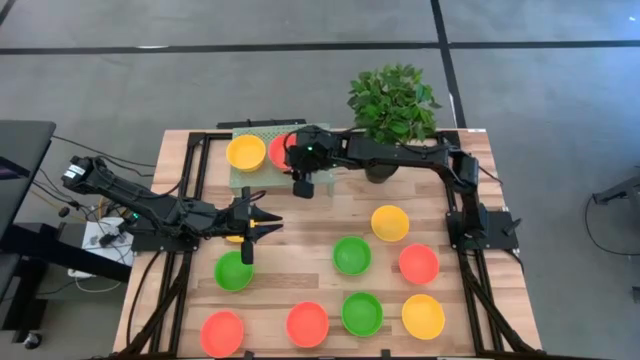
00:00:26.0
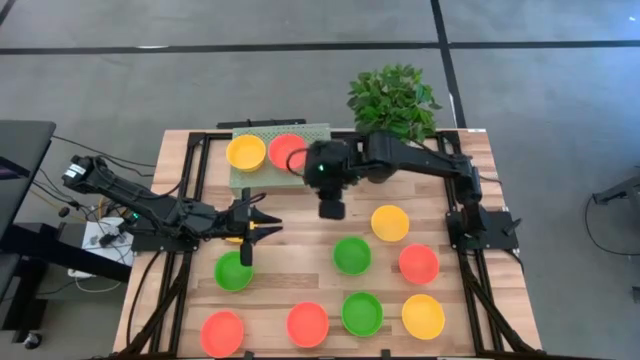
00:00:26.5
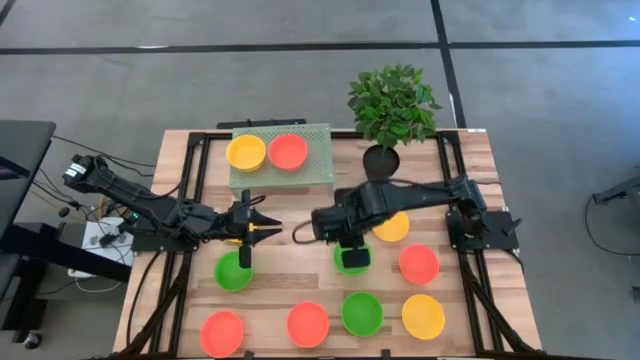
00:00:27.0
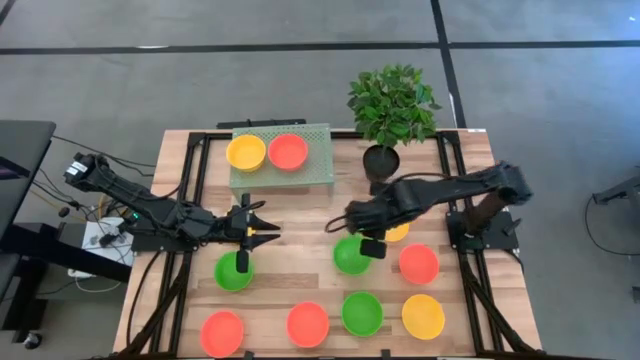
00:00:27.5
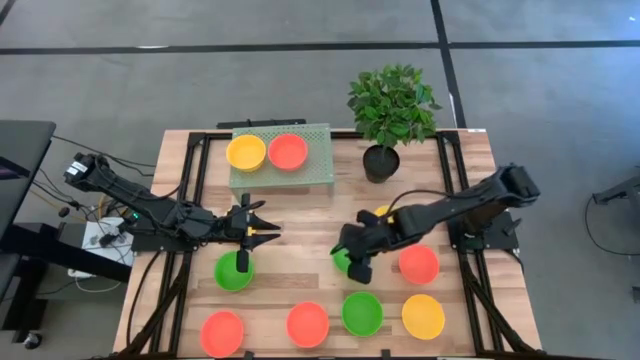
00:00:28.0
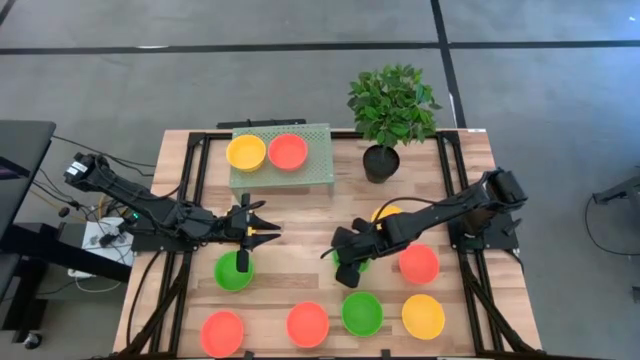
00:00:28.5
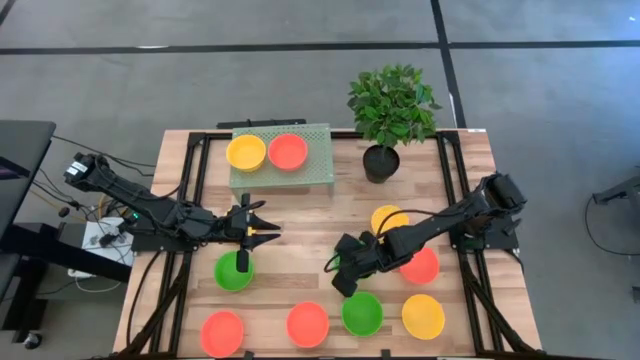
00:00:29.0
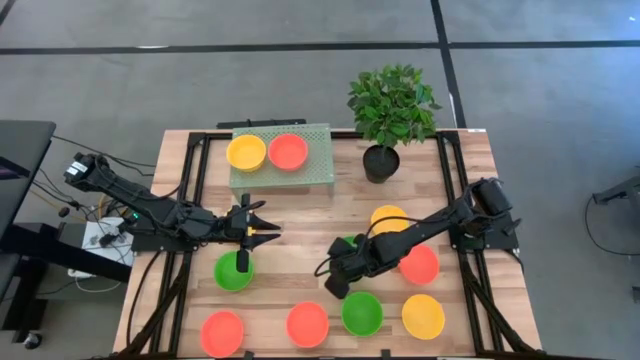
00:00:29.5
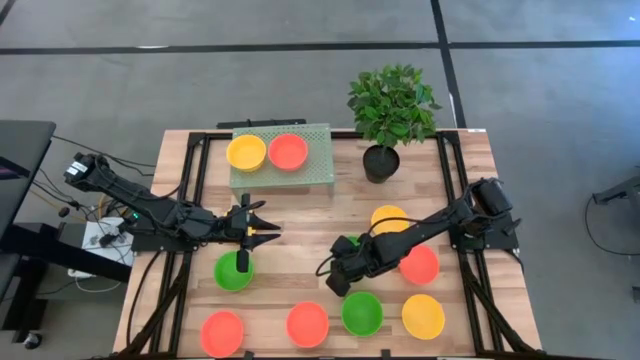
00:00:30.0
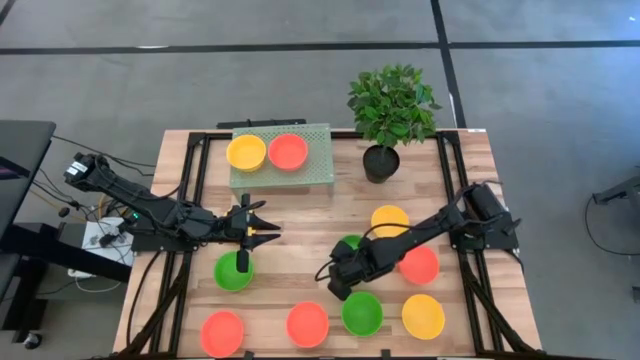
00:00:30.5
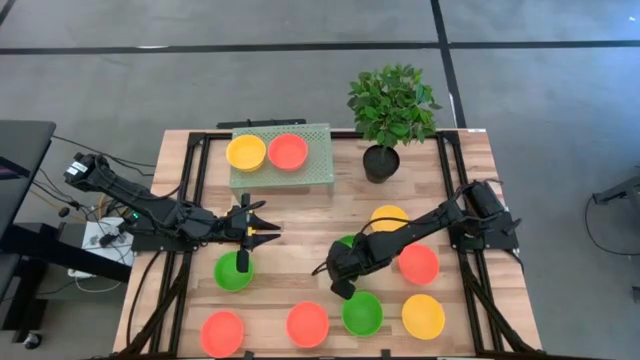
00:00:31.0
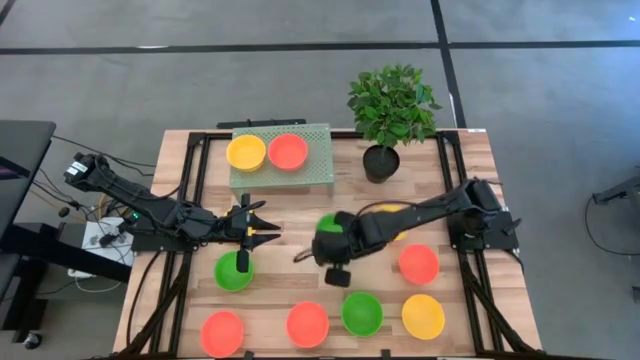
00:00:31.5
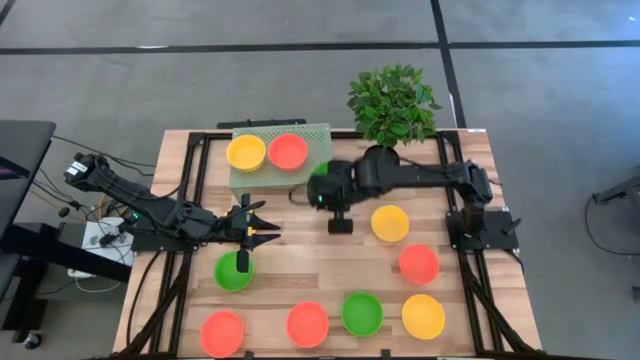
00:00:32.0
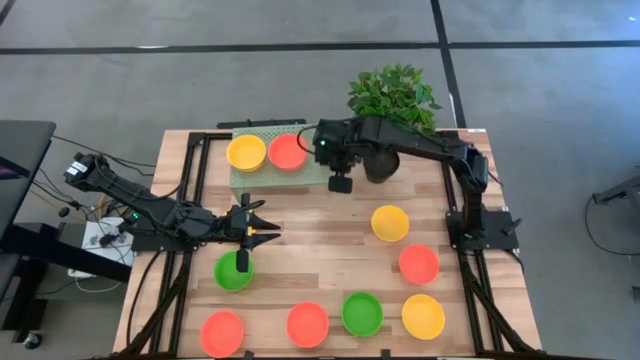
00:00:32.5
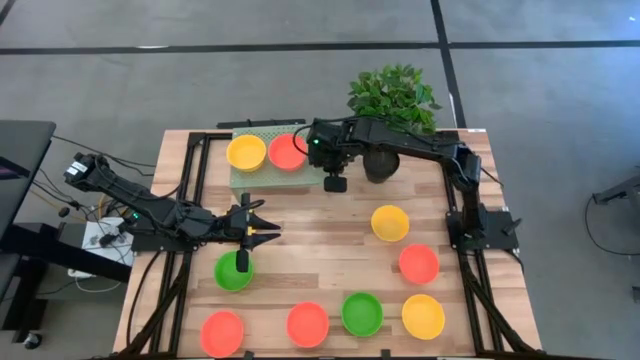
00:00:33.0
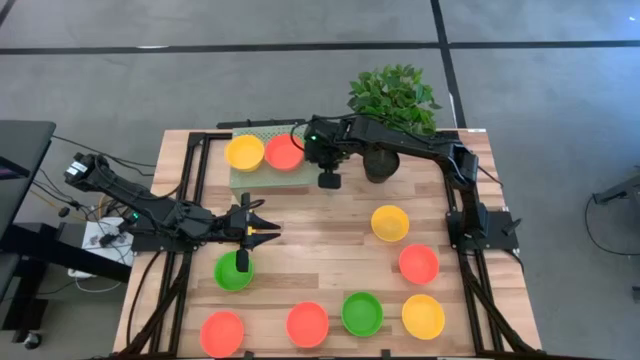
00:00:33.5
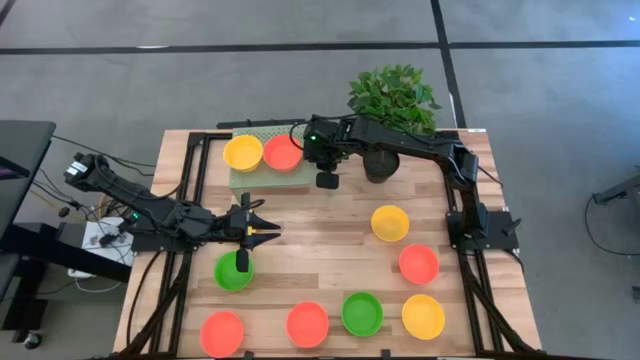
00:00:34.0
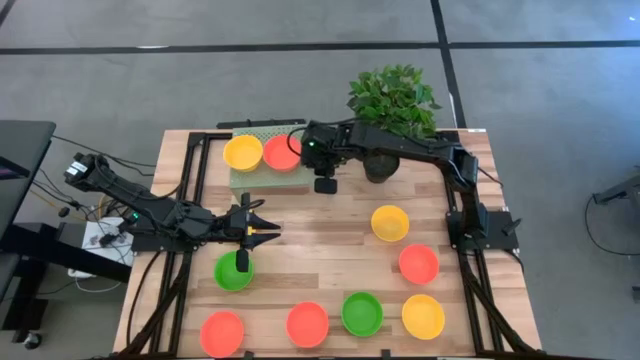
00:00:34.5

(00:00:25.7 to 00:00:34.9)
Task: Pick & Place Mini bowls
Put the green bowl on the shelf

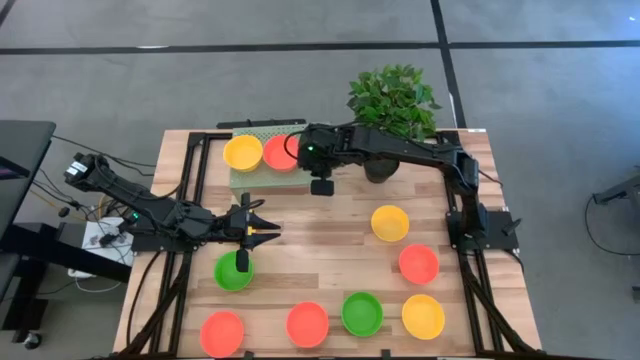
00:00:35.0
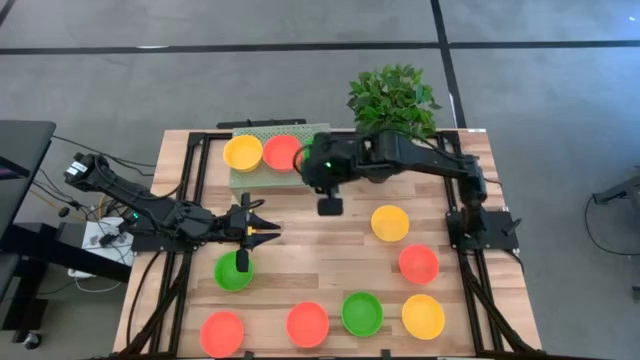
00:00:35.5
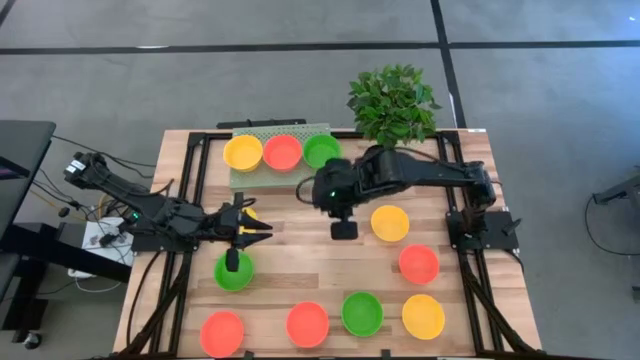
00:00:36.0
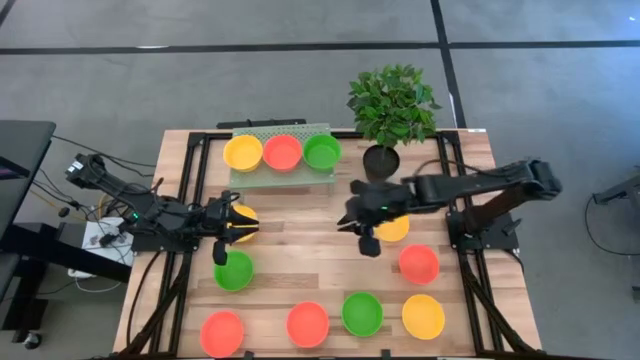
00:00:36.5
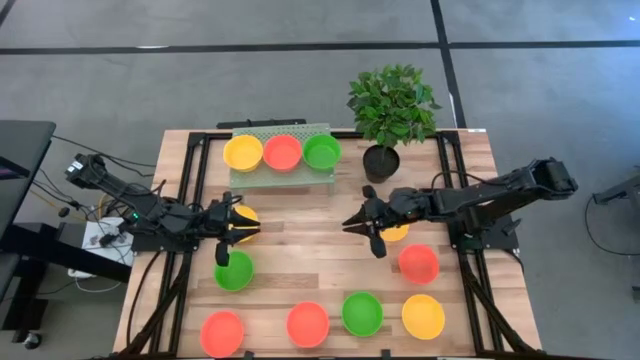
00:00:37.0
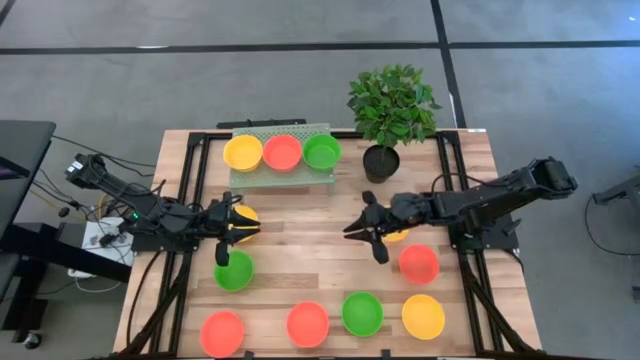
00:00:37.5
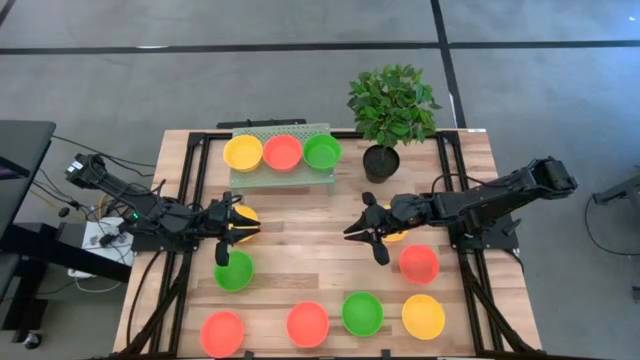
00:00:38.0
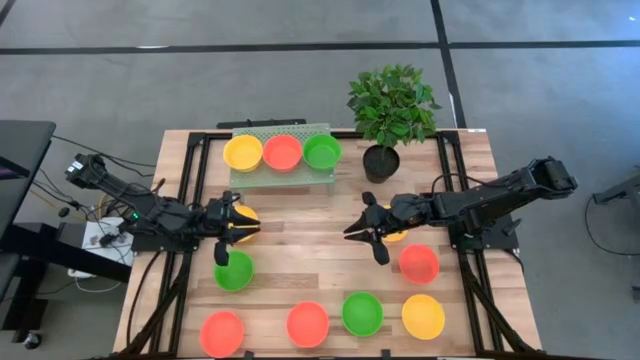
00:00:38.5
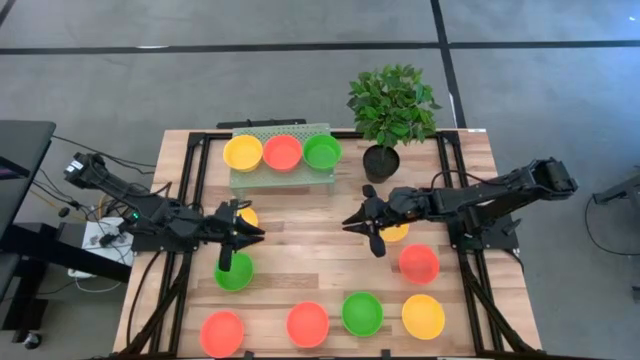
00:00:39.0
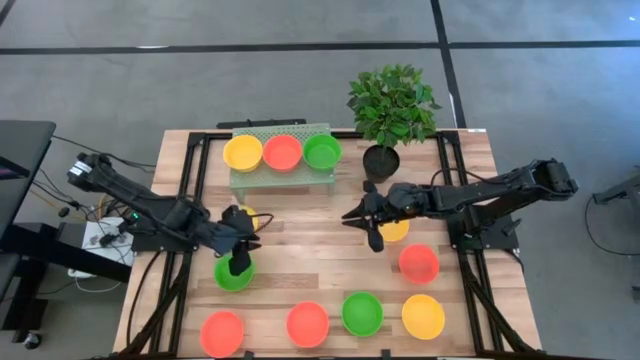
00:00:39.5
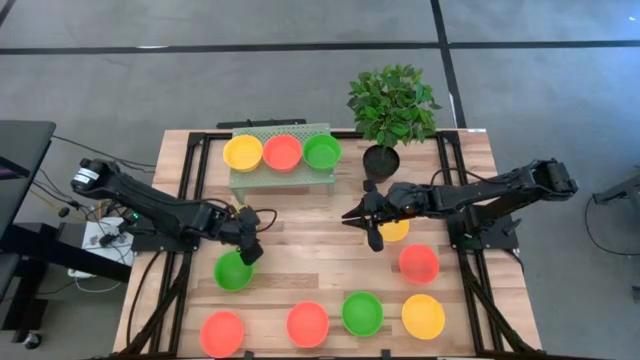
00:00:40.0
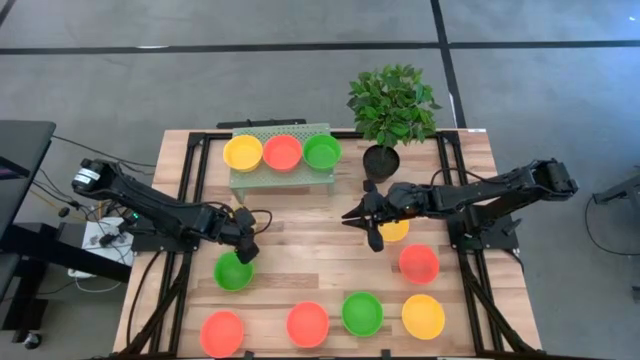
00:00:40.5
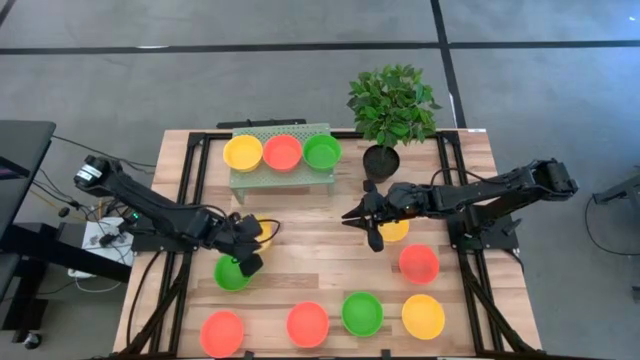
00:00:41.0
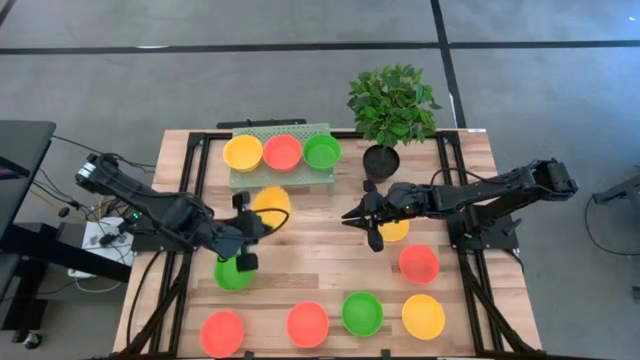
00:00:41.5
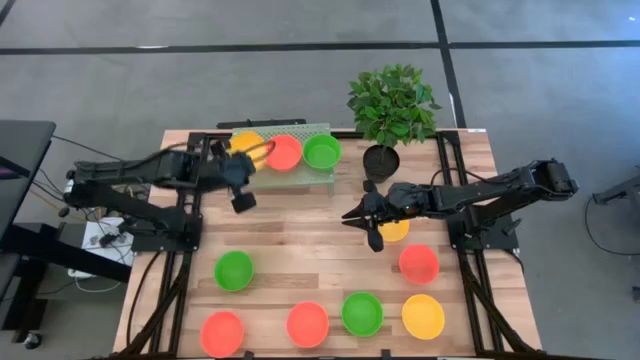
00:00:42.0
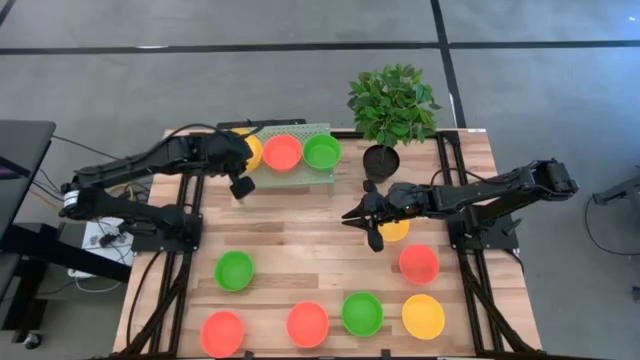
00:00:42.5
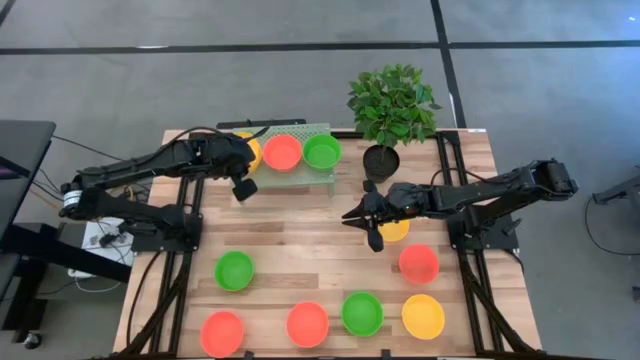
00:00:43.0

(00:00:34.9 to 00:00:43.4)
Stack the yellow bowl on top of the yellow bowl on the shelf

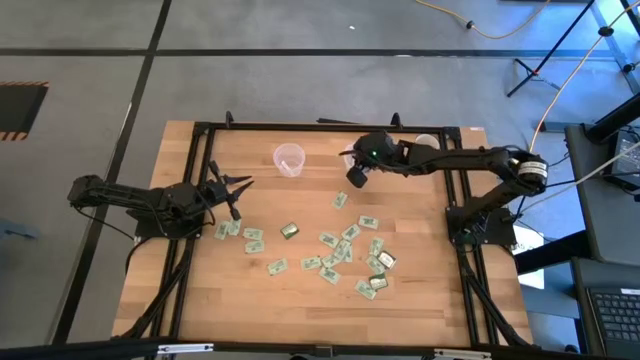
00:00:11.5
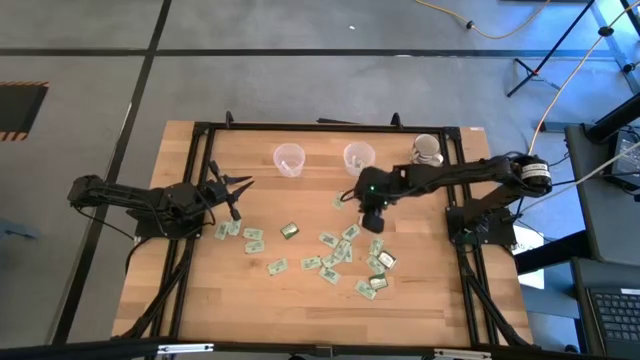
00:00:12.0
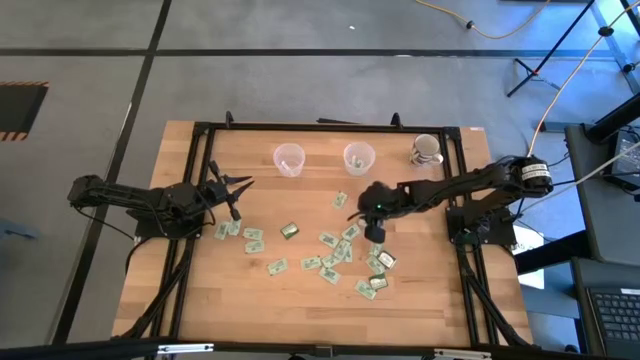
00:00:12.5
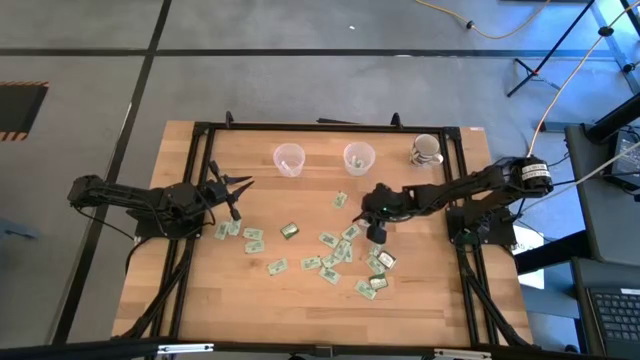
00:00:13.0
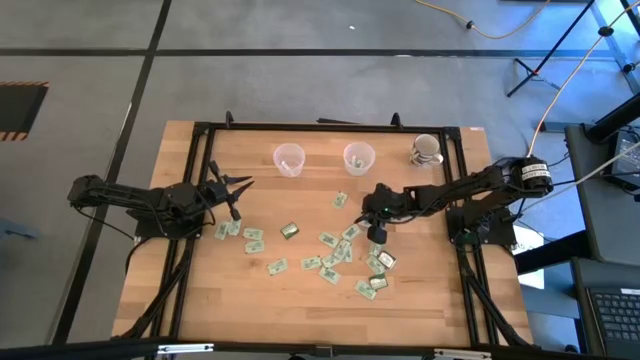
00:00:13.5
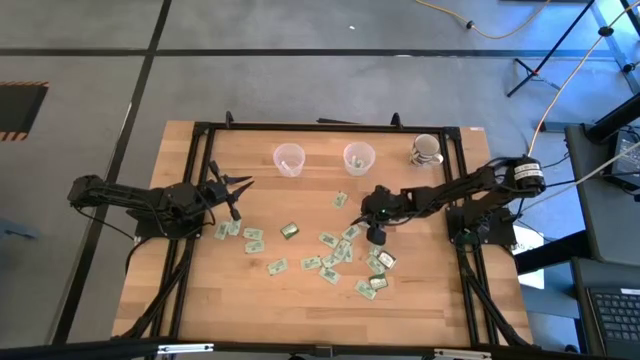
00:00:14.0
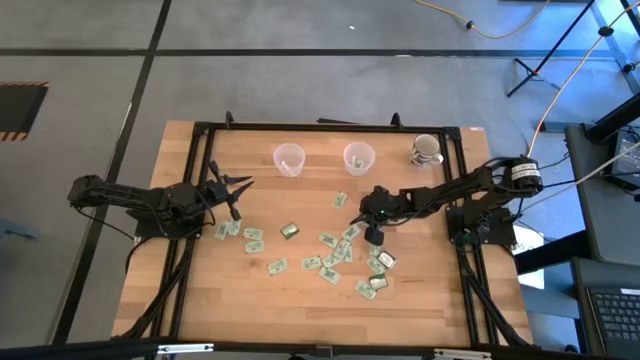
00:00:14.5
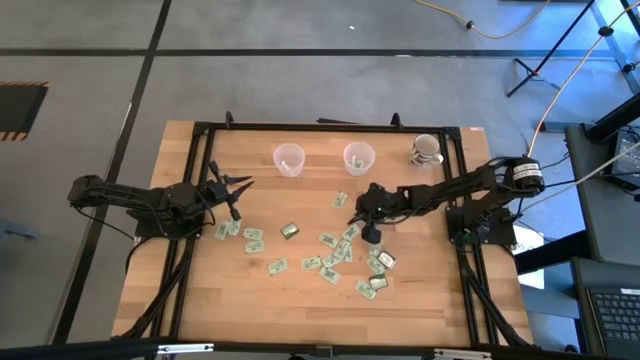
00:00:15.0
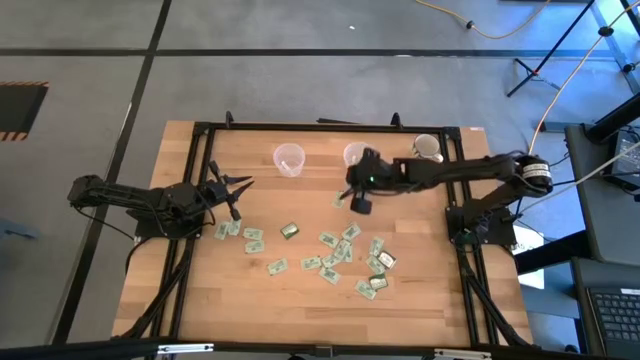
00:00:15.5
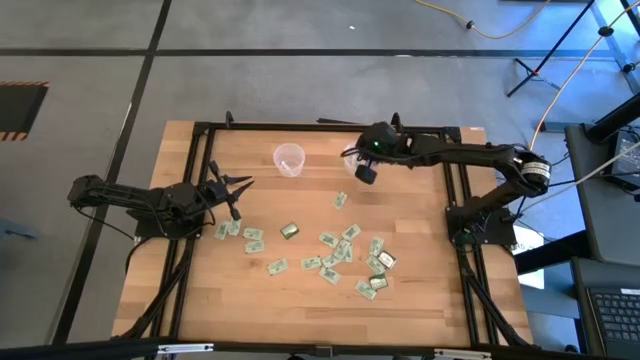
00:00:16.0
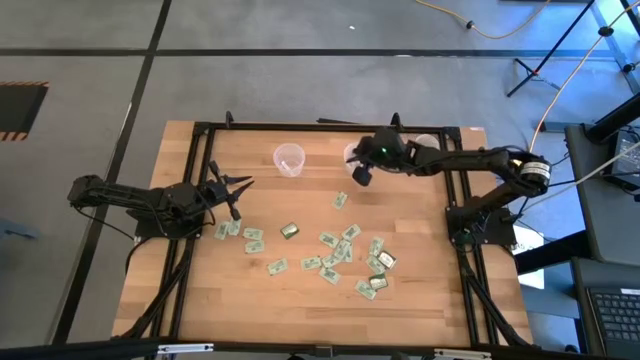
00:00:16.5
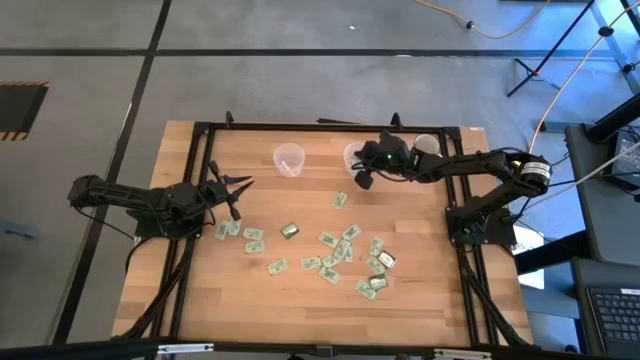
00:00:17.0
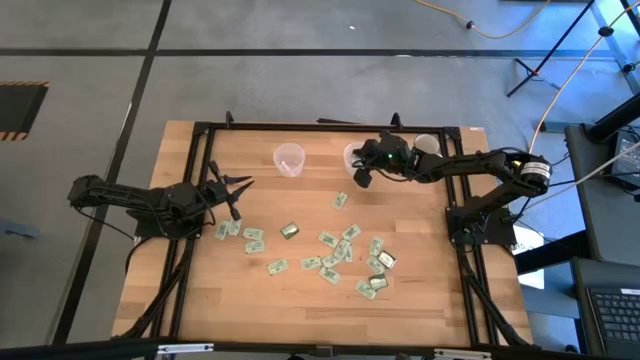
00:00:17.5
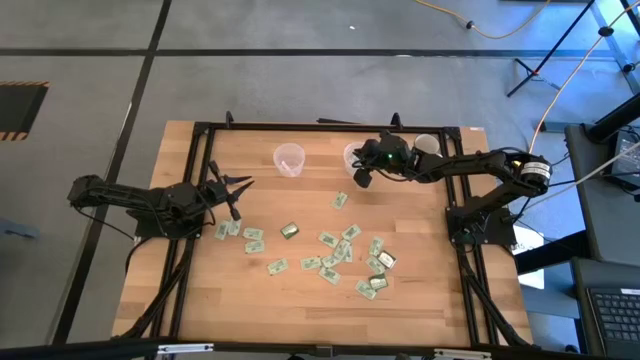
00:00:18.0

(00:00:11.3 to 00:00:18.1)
Task: Pick and place Stevia / Truvia into bins
Put the stevia packet into the right transparent container
